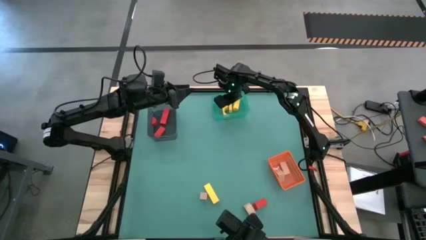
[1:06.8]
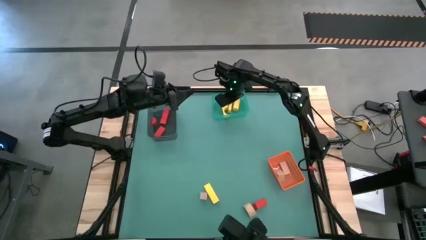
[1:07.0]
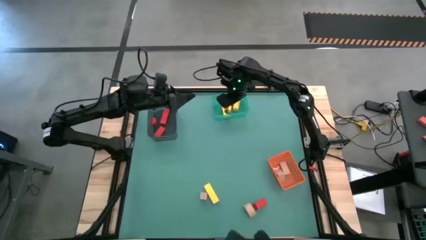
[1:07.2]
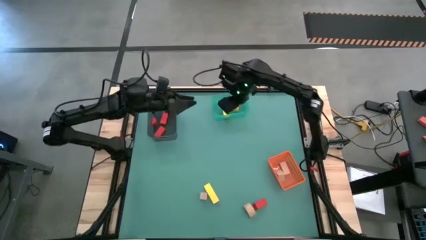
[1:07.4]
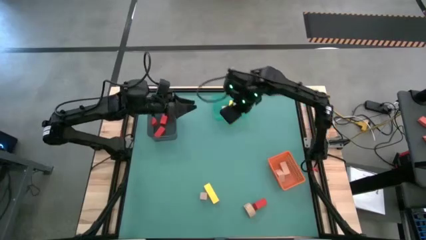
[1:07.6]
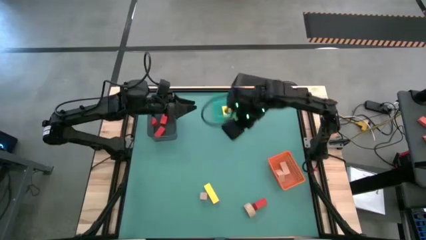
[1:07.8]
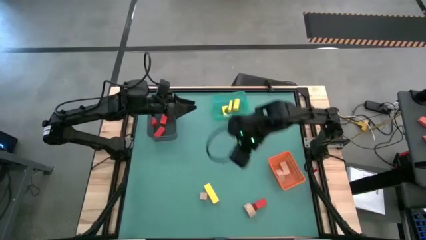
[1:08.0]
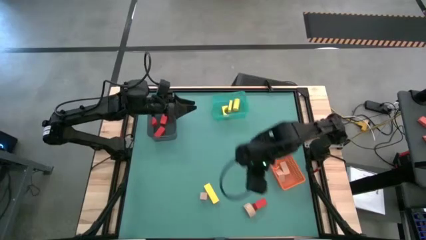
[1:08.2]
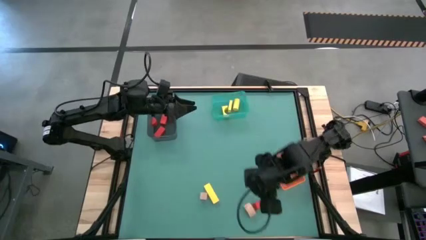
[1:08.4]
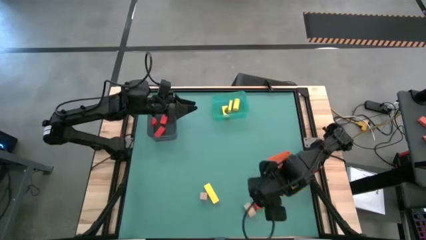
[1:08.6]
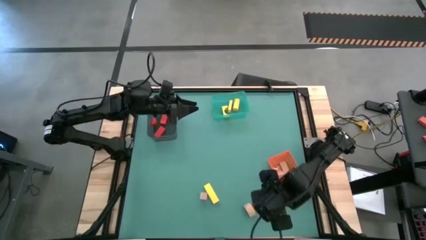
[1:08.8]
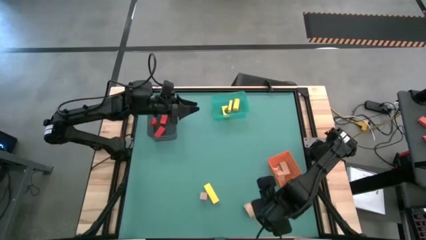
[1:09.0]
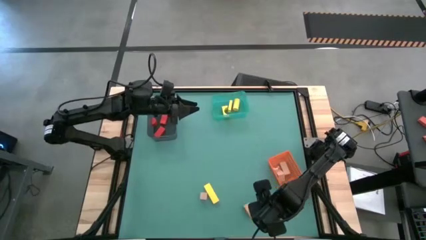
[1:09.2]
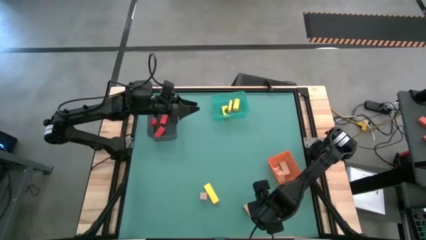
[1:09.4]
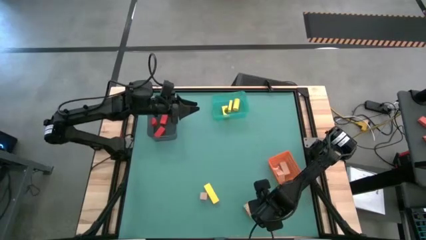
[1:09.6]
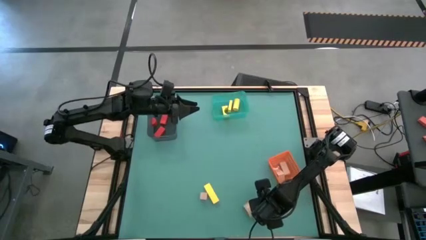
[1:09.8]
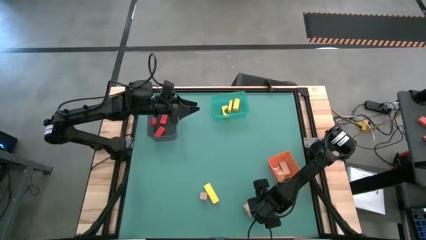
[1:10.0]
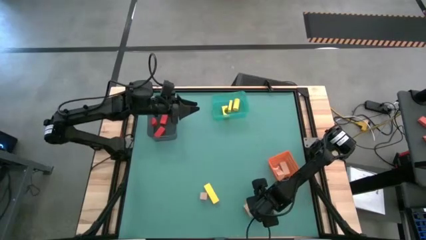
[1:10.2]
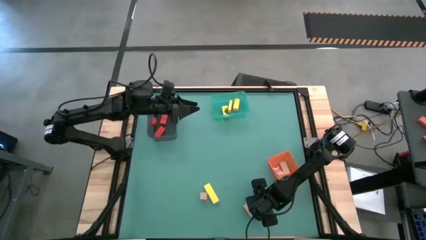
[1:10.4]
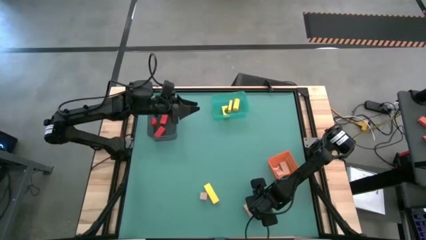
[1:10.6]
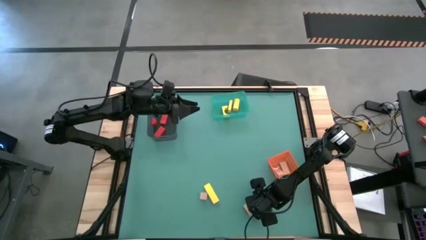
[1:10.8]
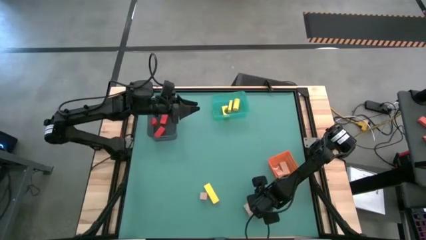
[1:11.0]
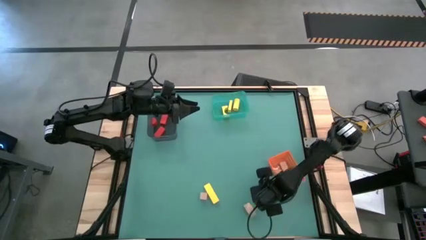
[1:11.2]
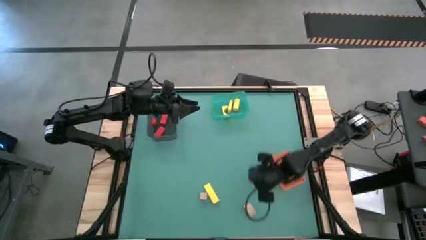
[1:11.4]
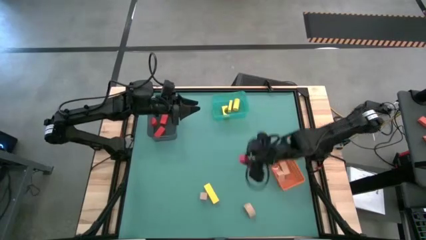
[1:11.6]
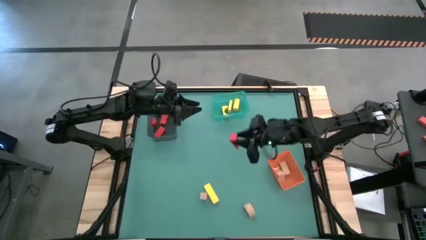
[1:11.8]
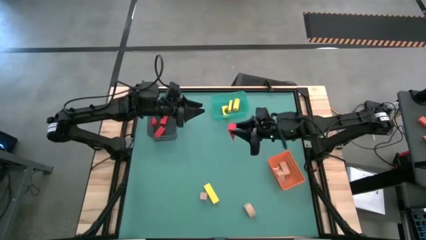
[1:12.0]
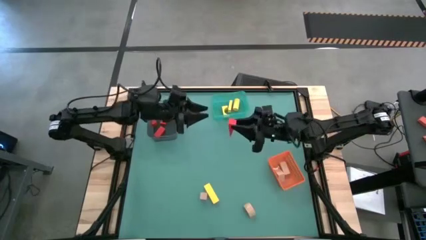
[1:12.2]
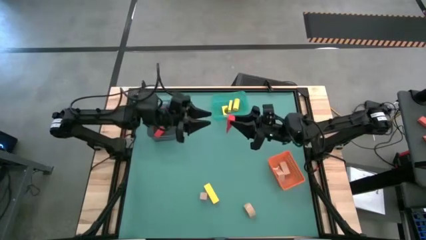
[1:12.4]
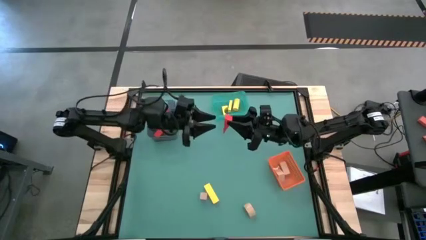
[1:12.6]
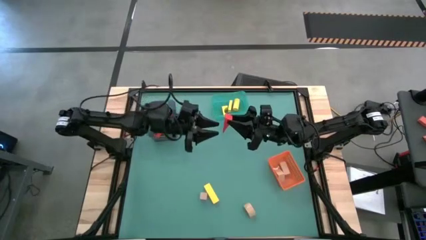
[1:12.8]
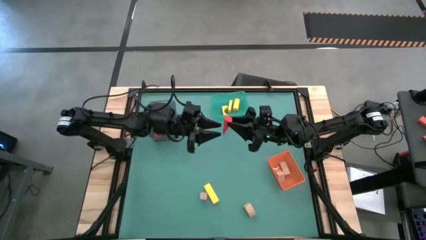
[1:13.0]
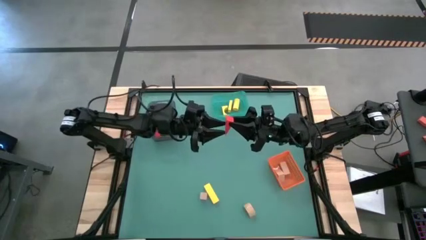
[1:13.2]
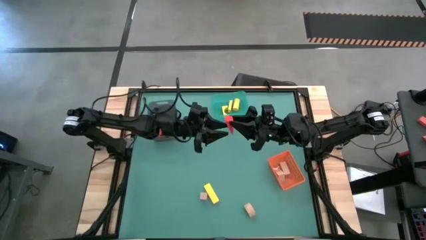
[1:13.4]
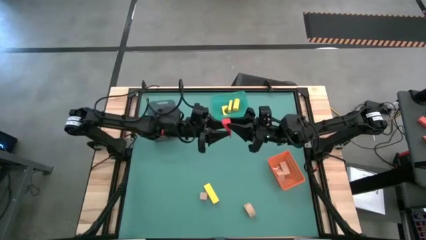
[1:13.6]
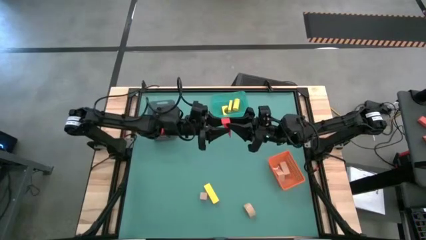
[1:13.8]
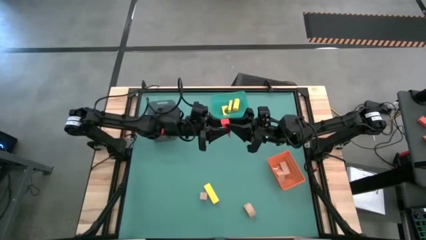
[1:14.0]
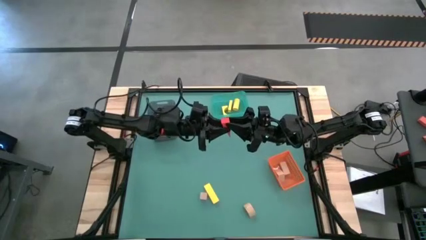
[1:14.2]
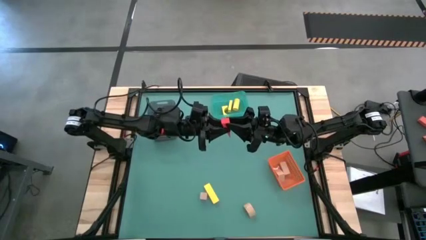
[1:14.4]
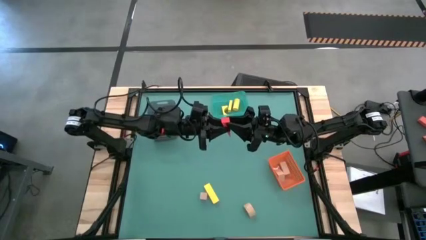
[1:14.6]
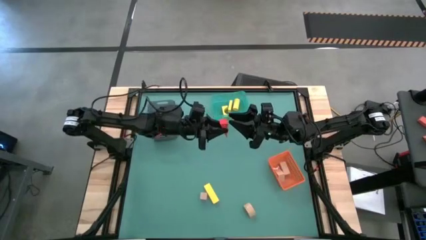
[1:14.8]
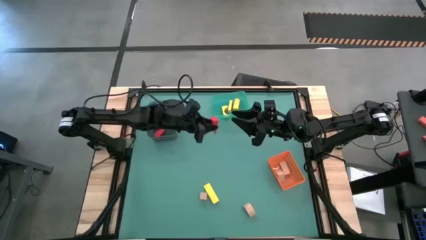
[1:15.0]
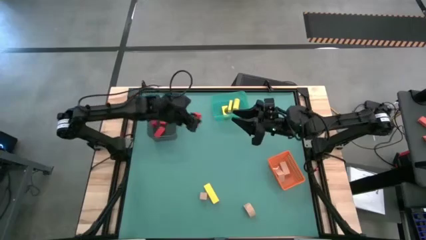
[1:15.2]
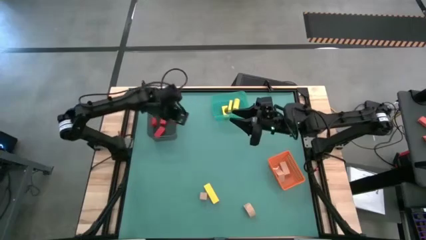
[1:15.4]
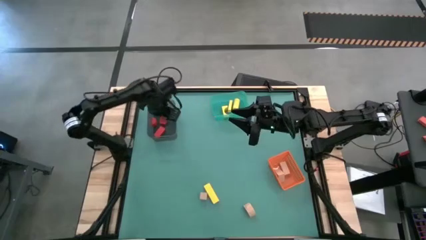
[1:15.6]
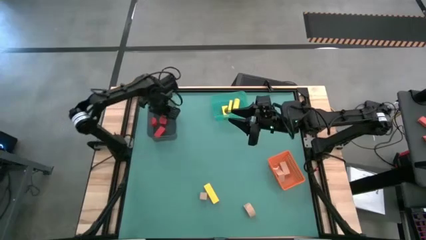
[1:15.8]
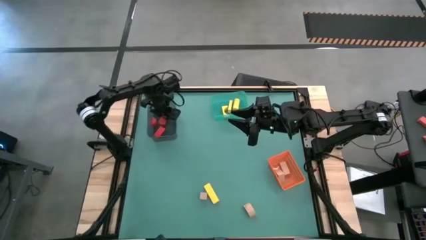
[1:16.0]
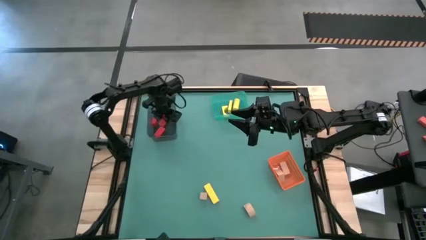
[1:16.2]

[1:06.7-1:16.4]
Task: Sort & place blocks by color
Put the red block into the black bin

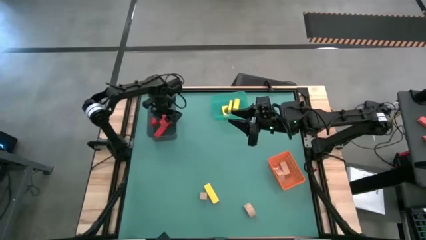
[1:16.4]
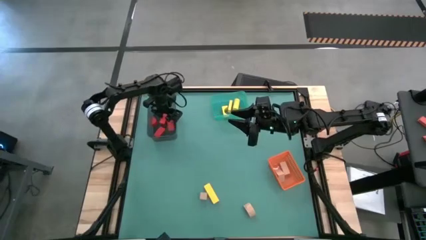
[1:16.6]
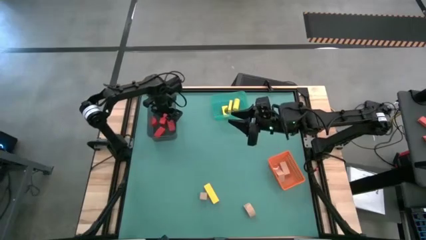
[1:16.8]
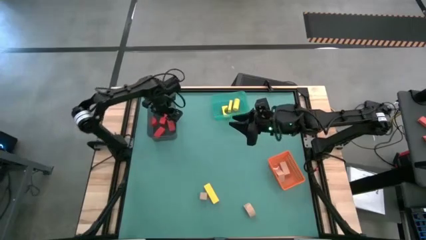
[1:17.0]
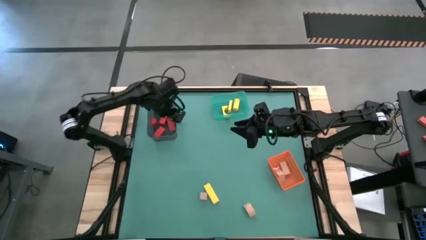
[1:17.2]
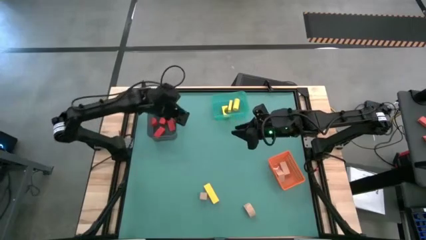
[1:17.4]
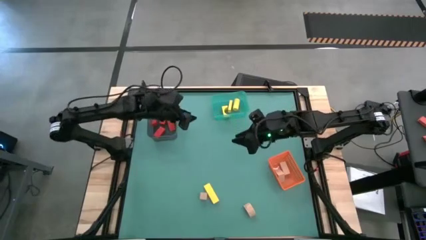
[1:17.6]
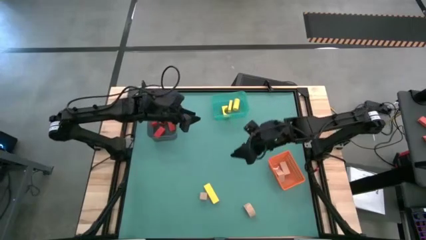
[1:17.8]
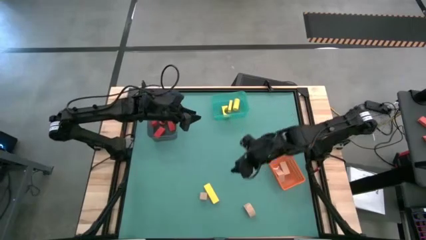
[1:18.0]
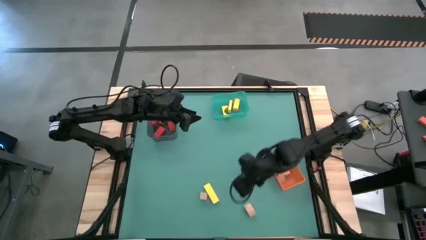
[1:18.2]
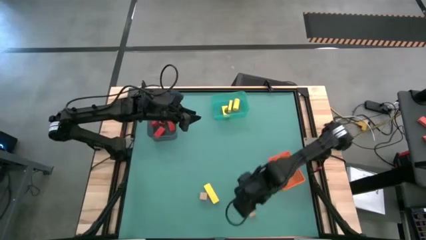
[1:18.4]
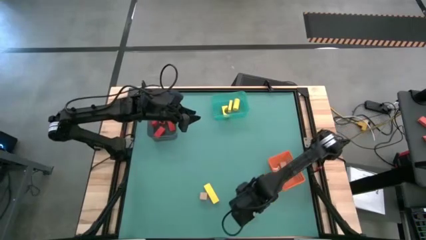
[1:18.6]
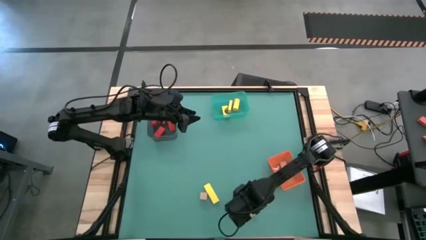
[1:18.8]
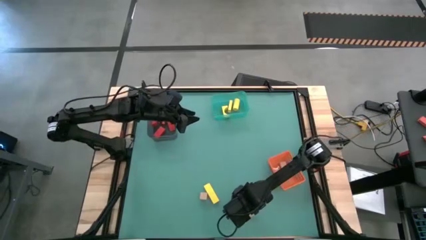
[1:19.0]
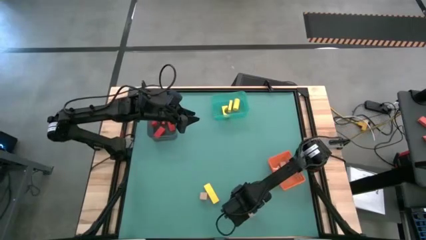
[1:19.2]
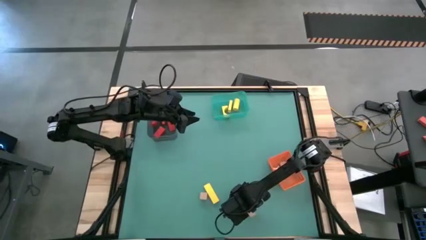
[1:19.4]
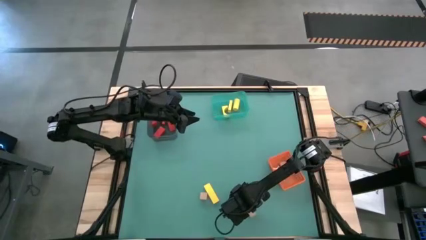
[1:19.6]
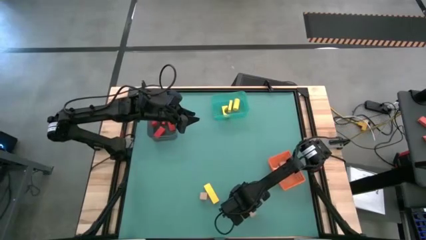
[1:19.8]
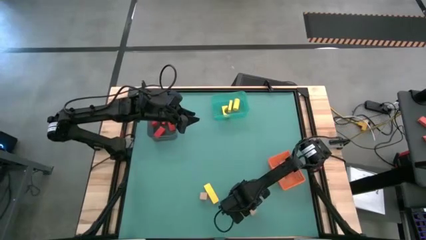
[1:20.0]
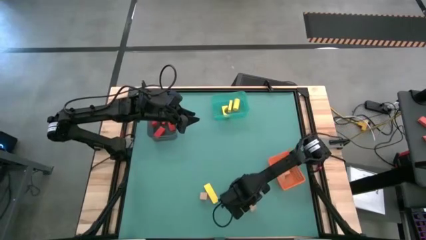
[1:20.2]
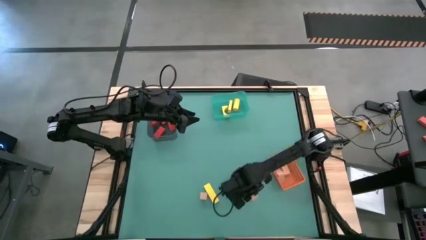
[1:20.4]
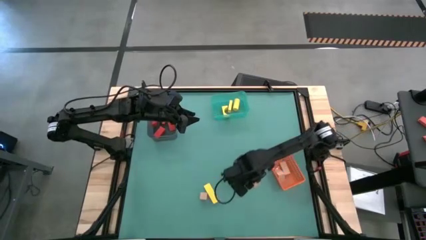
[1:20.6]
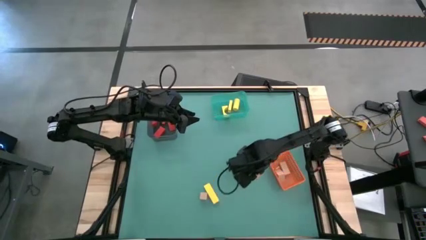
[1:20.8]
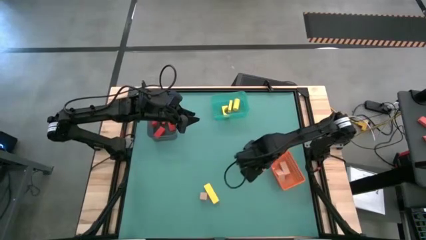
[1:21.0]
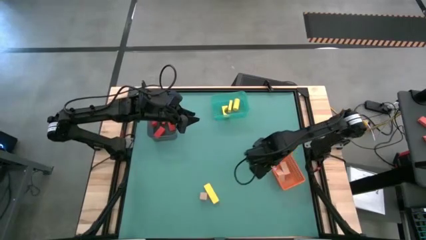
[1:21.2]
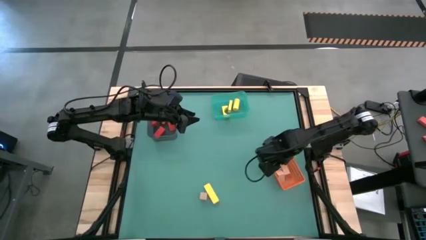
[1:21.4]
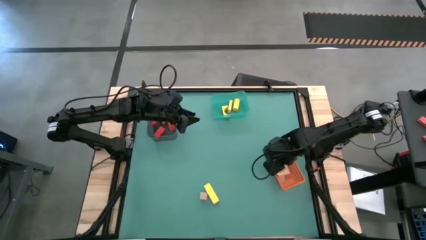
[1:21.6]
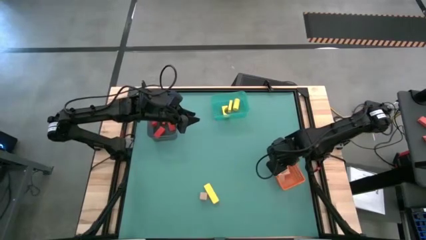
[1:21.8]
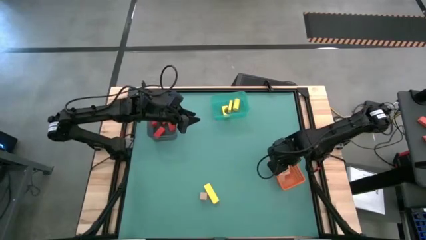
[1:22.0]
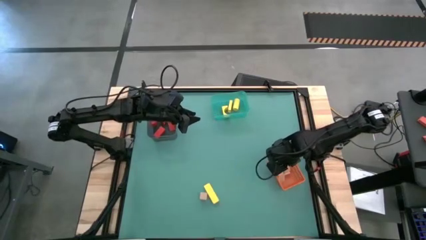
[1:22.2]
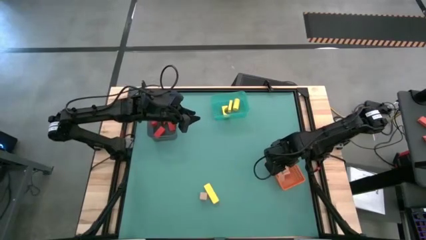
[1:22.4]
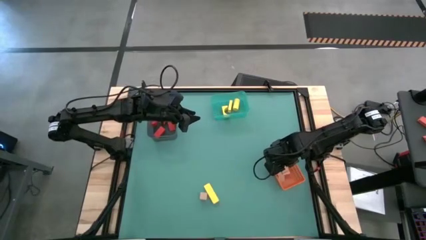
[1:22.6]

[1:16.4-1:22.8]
Put the light brown block into the orange bin
